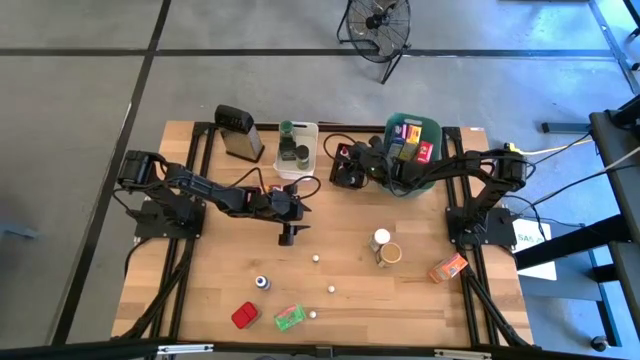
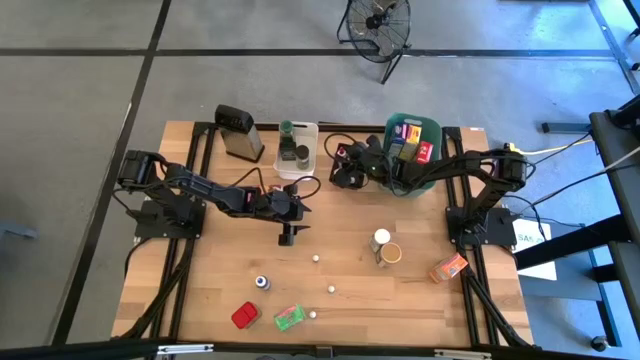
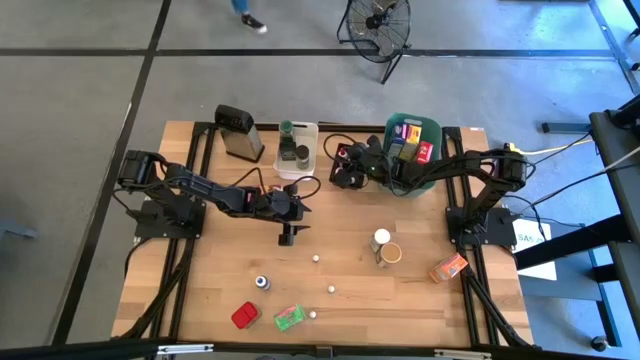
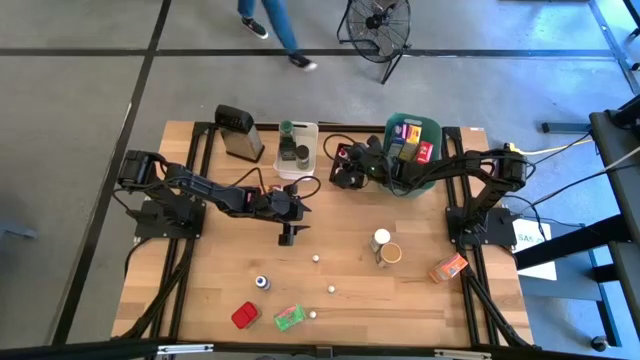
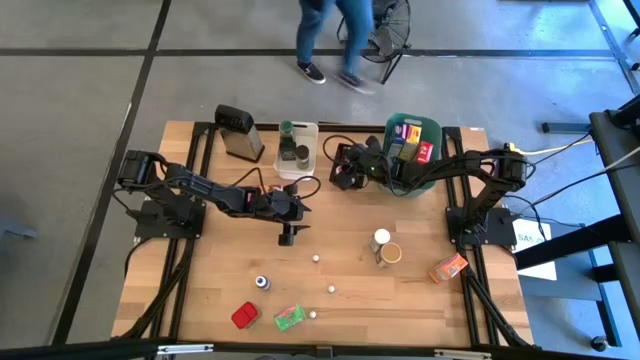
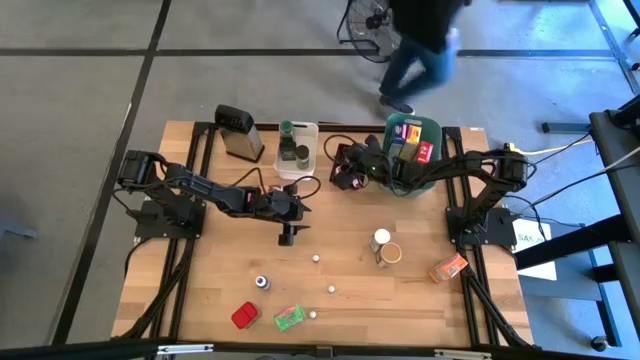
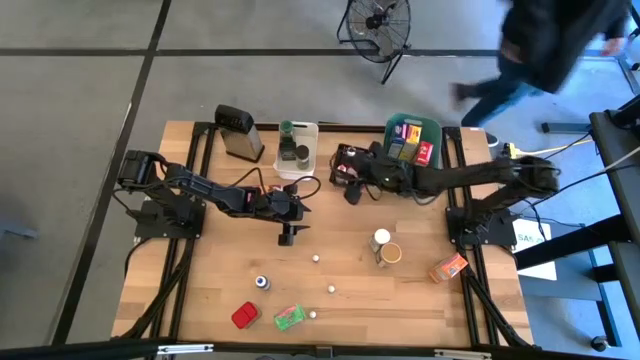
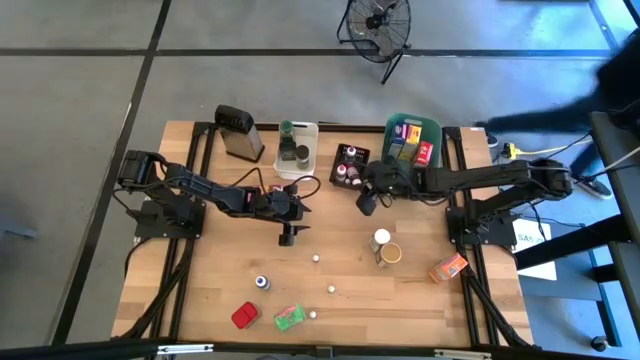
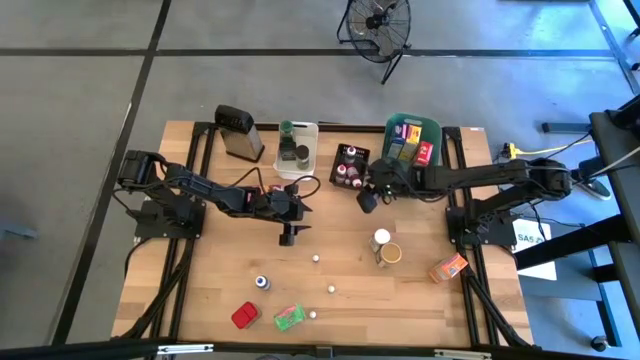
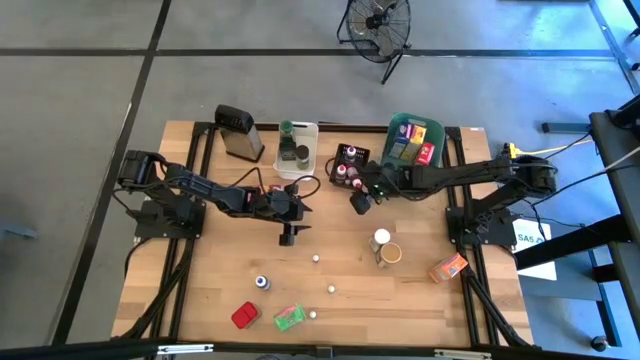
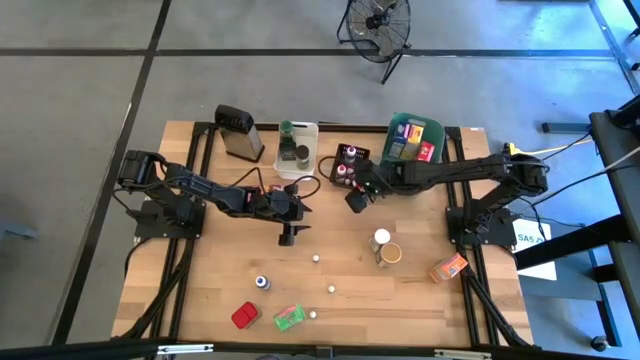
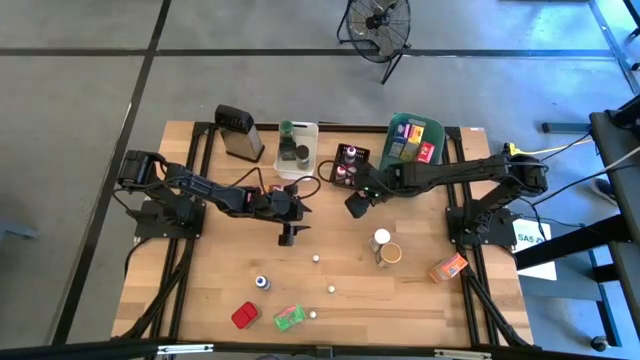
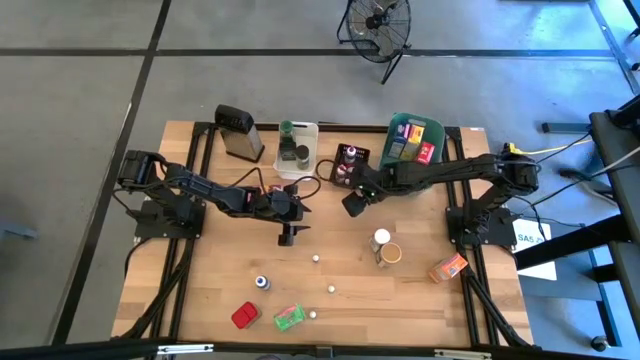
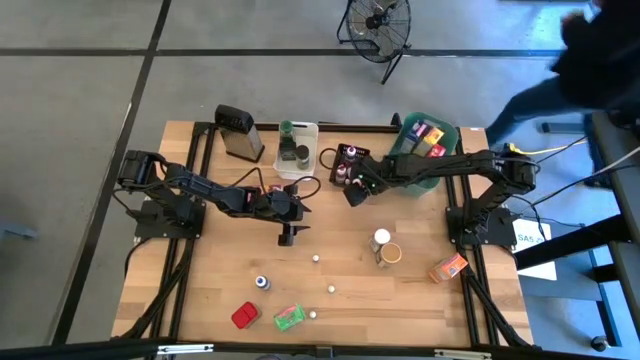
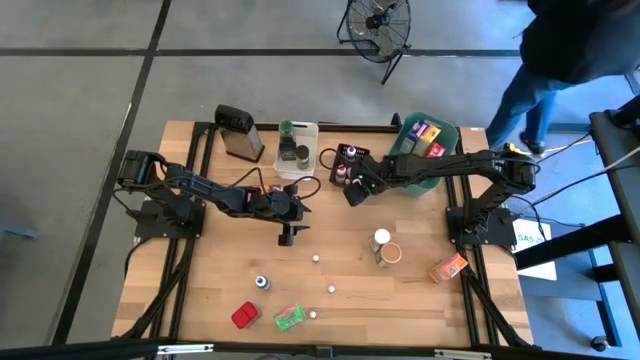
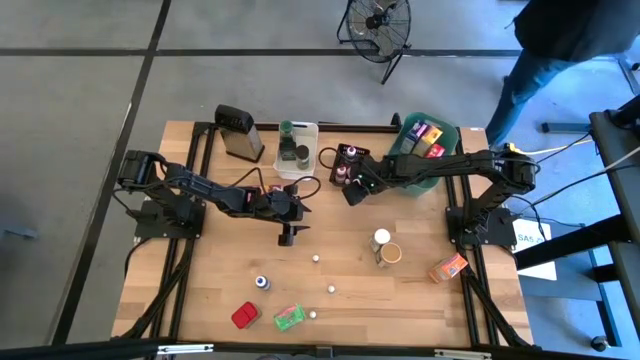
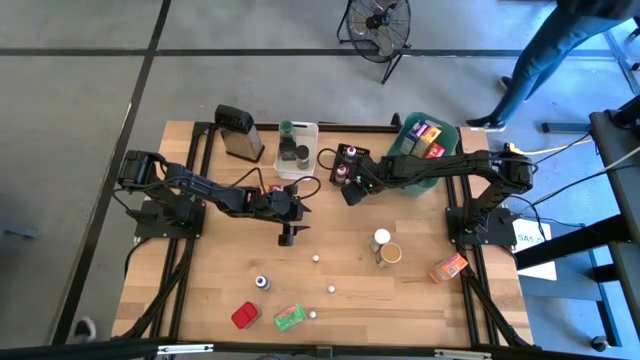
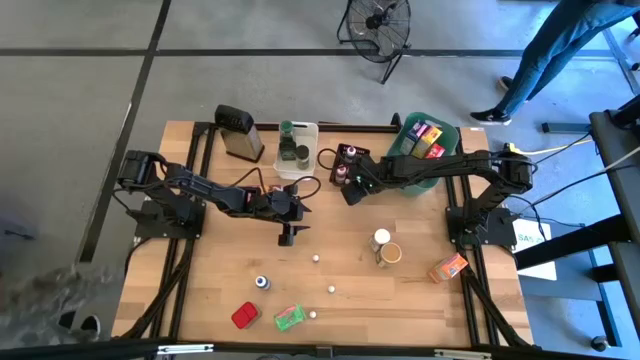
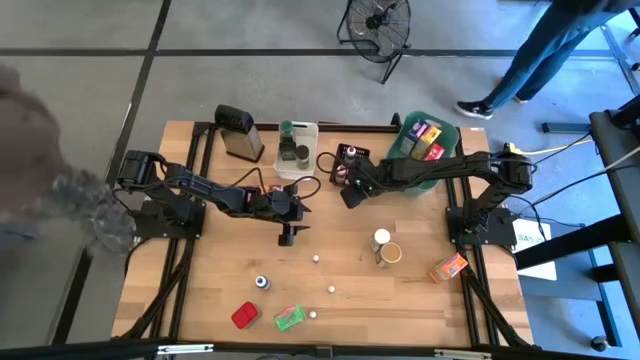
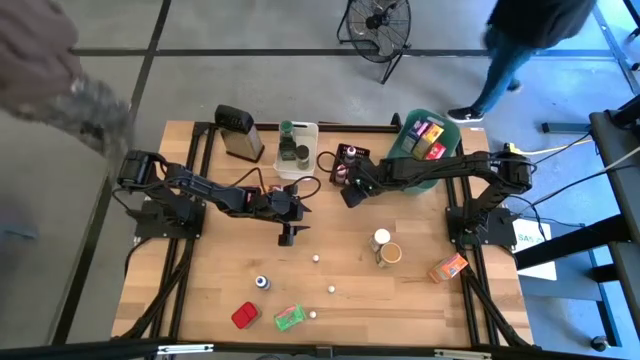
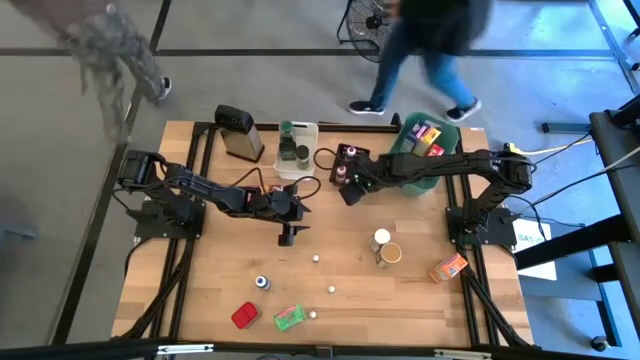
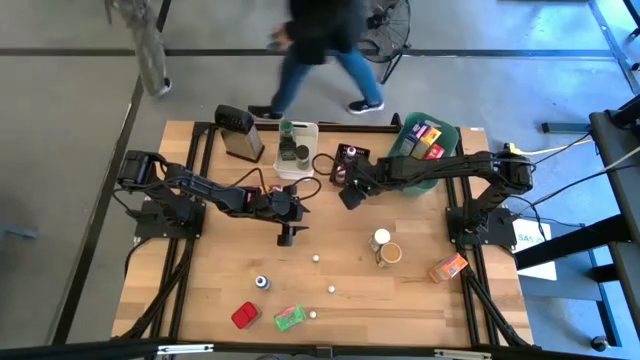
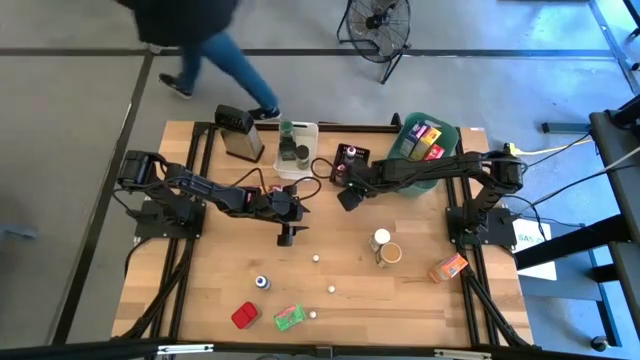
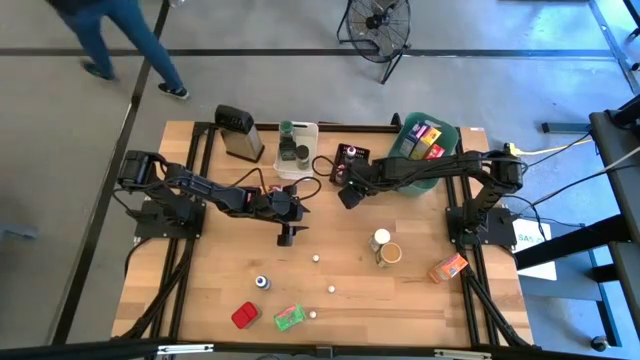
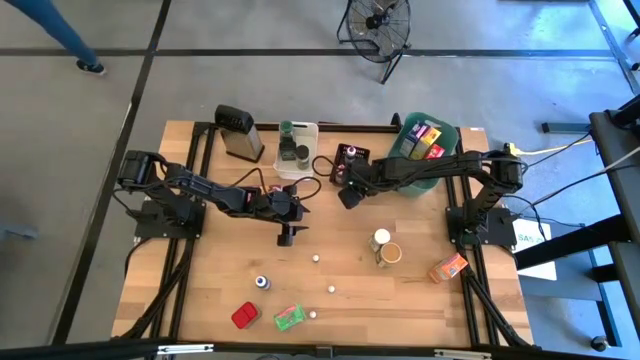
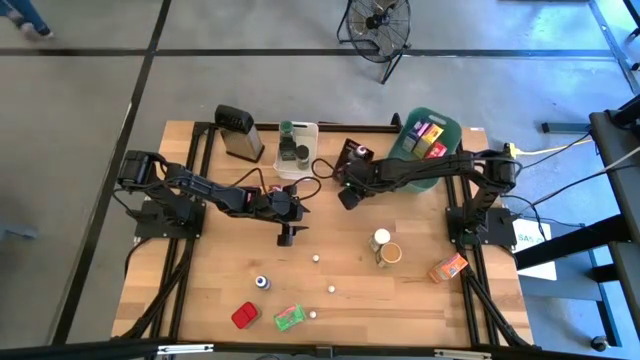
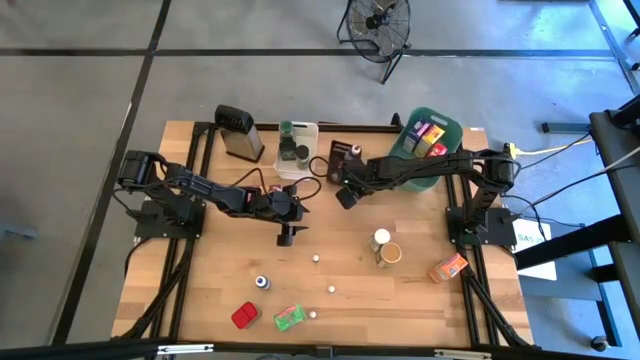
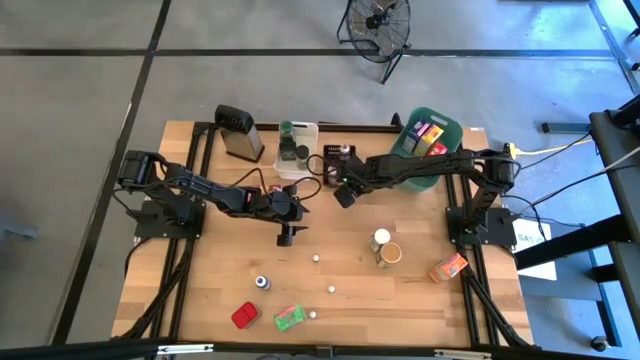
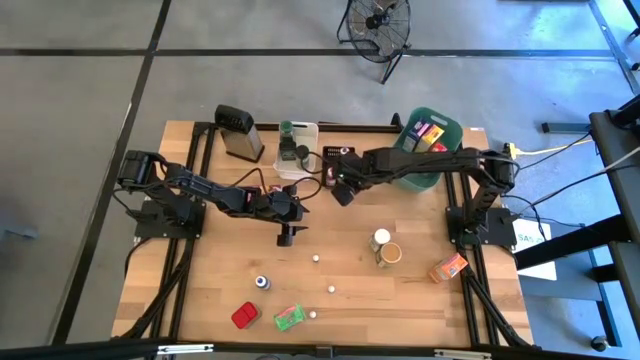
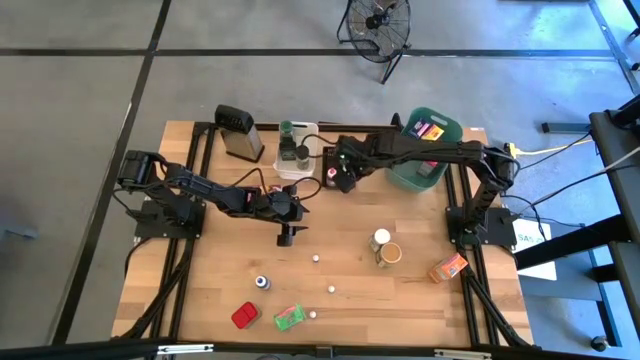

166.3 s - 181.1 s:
Task: Pick & Place Kitchen Items
Put the large red food coloring bottle into the black bin

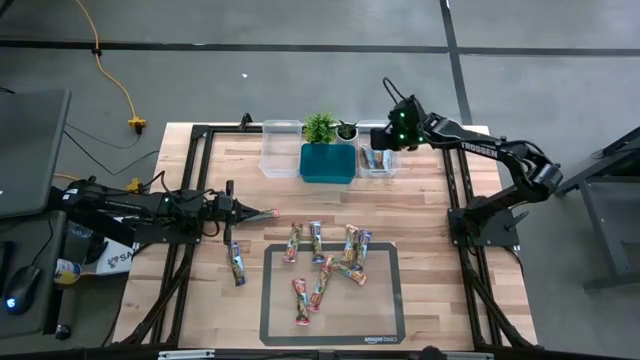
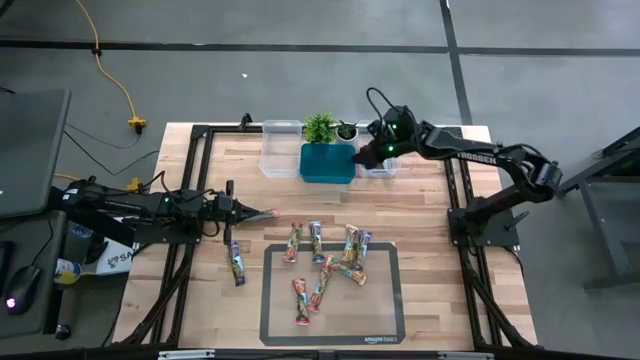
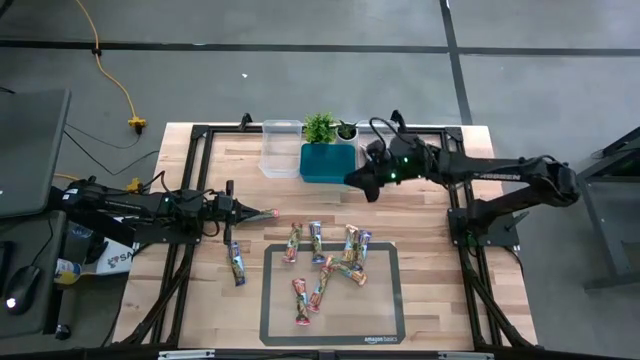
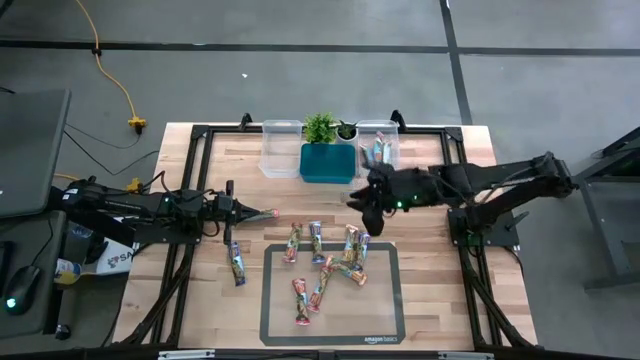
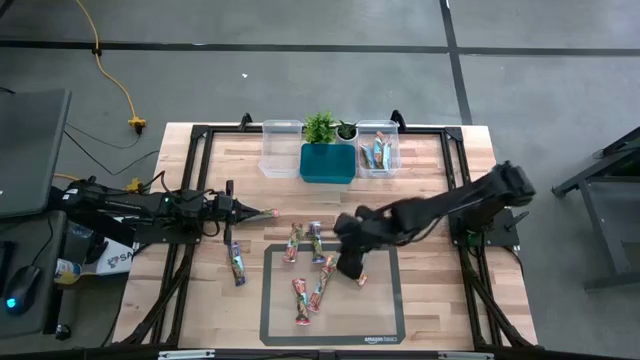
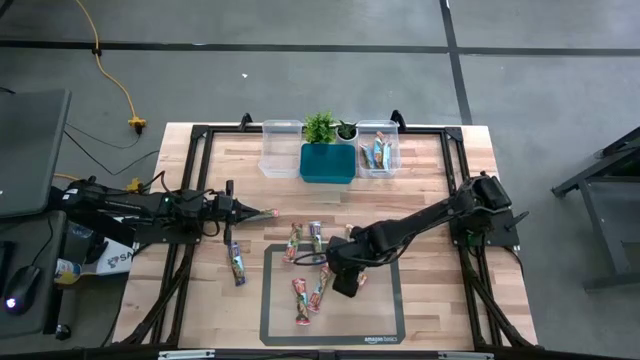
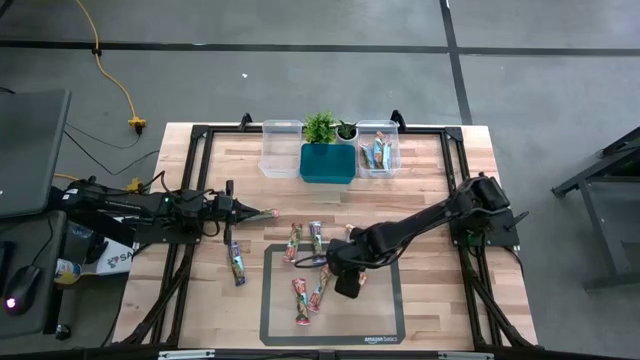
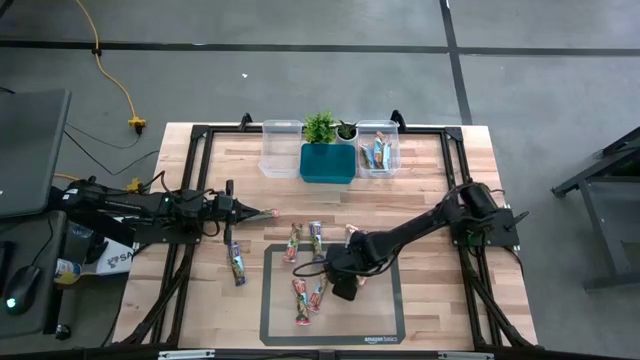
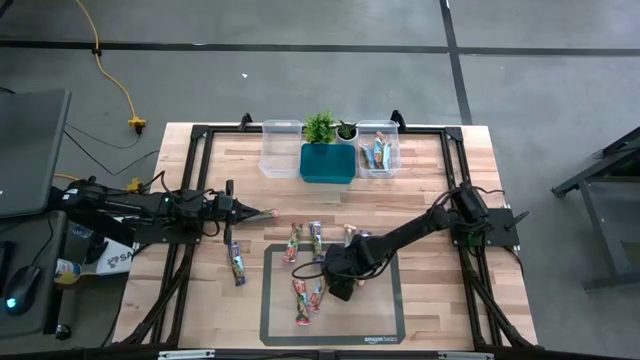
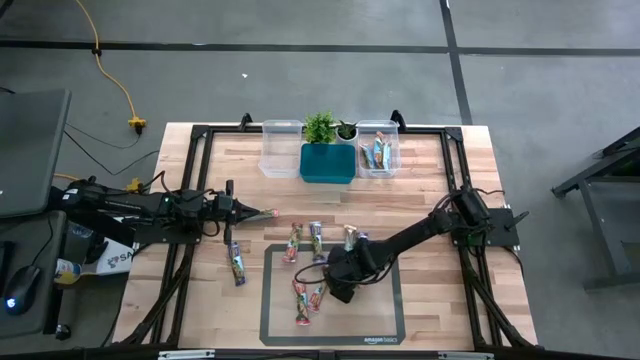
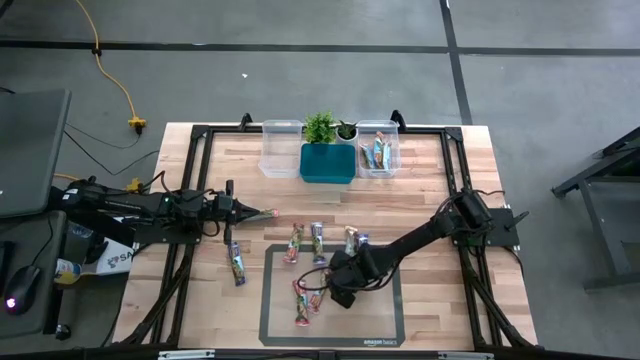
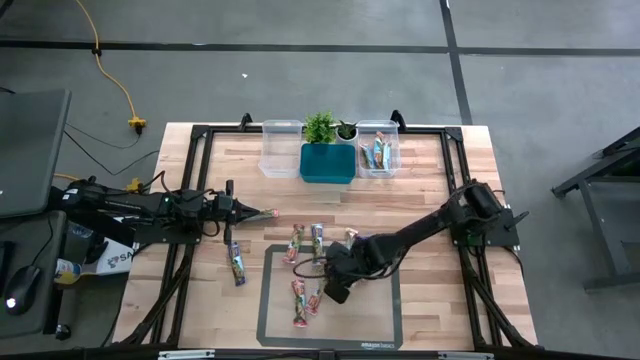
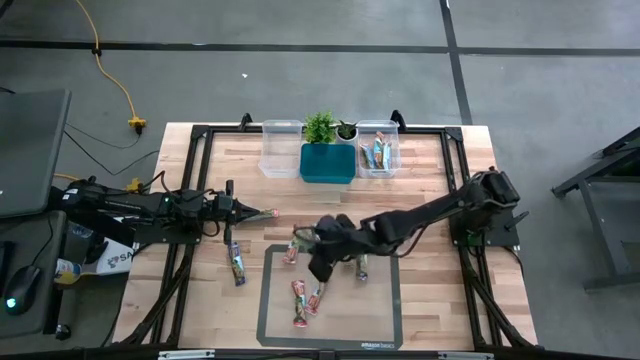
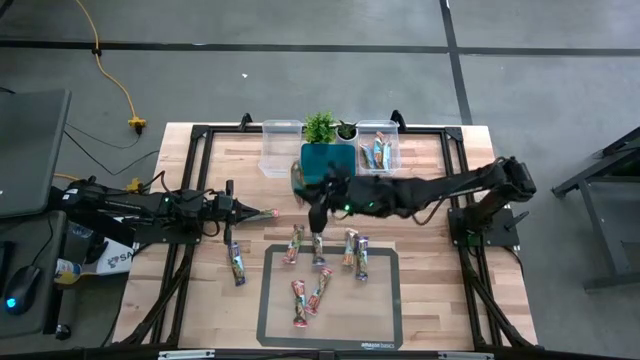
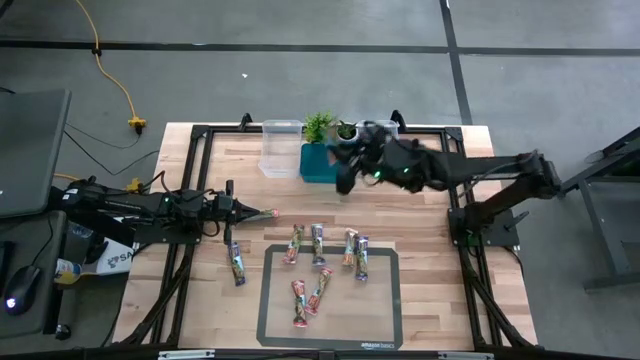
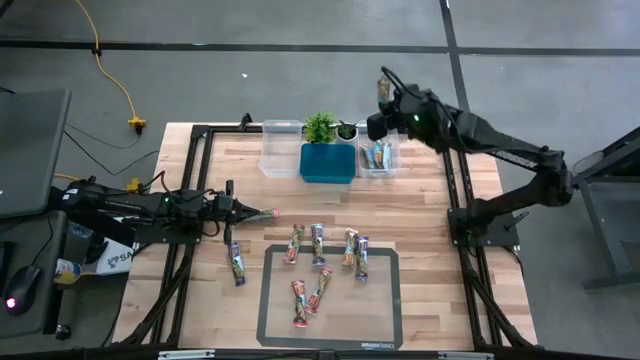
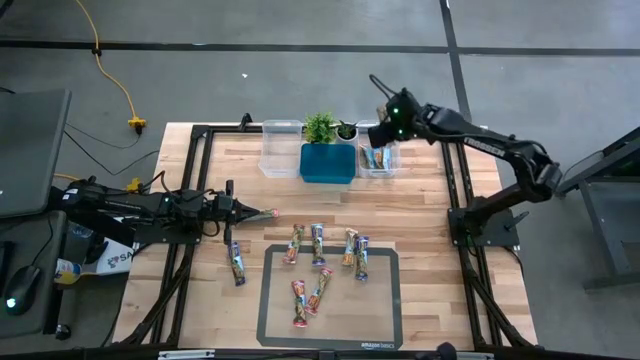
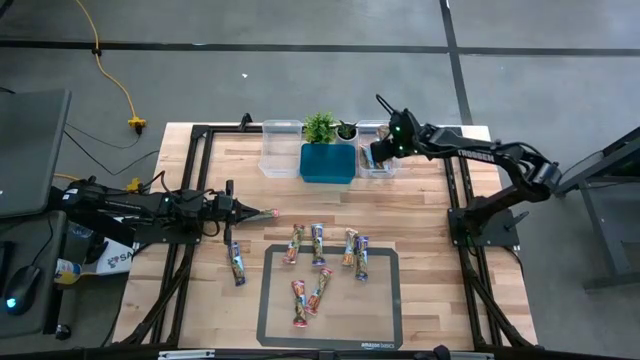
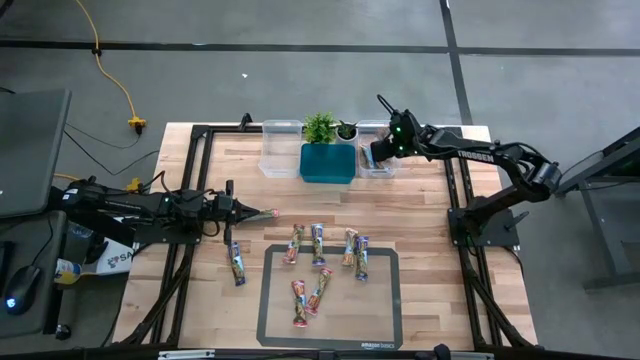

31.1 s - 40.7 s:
Task: Pick and place Granola Bars by type
Put the yellow granola bar into the right transparent bin
